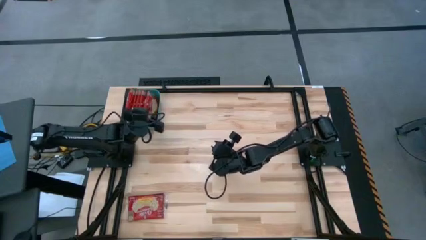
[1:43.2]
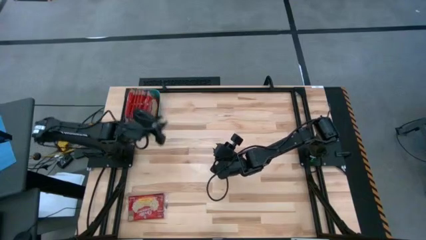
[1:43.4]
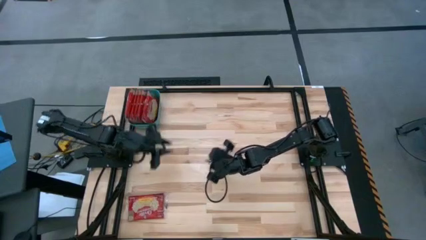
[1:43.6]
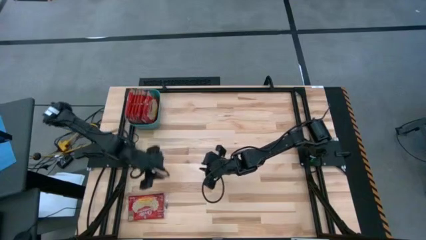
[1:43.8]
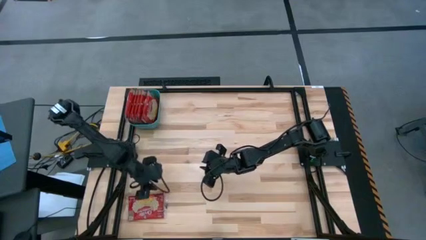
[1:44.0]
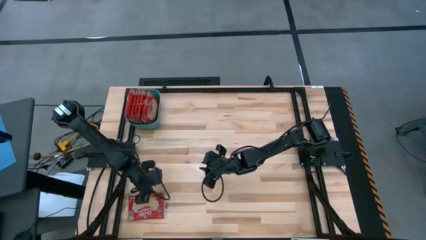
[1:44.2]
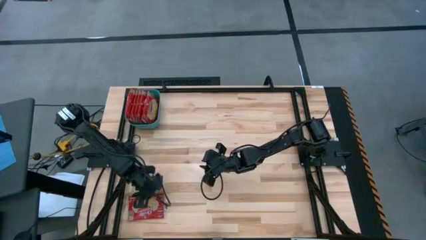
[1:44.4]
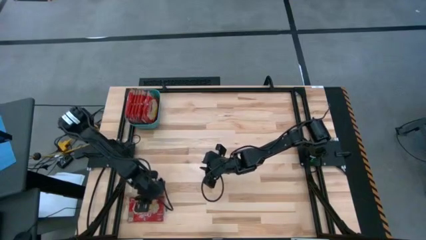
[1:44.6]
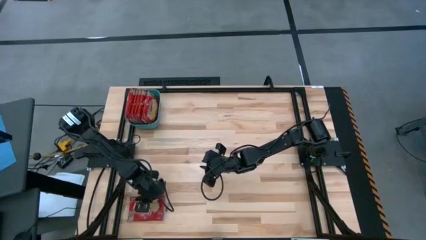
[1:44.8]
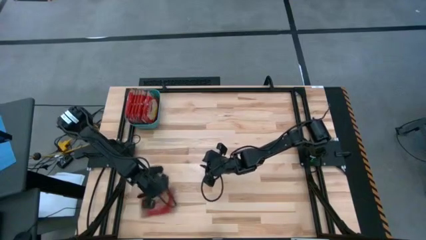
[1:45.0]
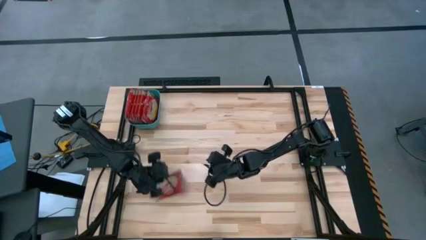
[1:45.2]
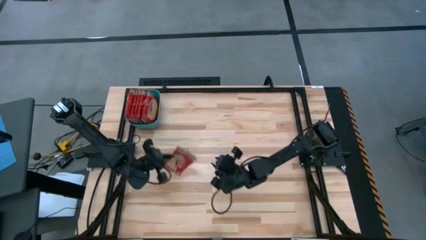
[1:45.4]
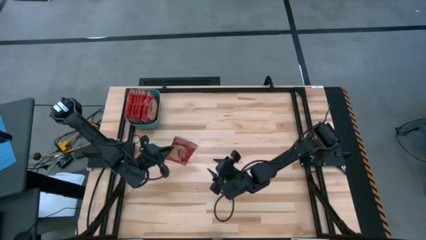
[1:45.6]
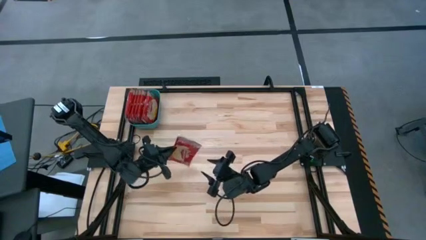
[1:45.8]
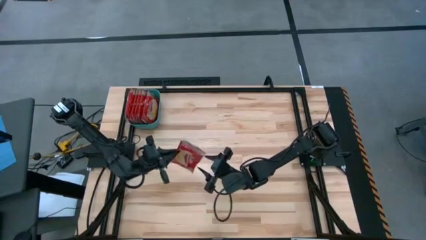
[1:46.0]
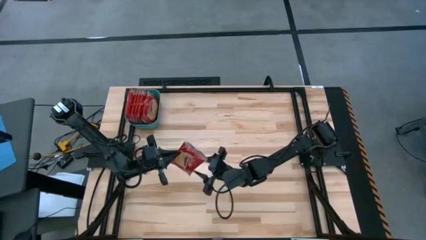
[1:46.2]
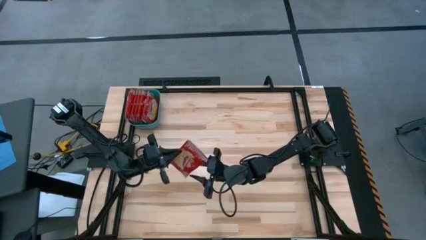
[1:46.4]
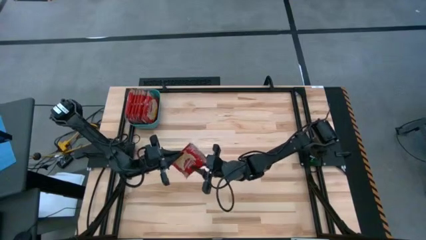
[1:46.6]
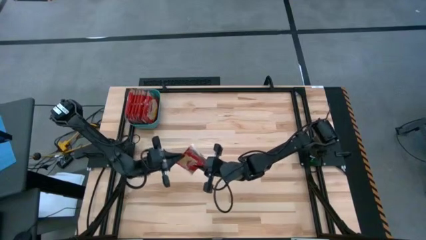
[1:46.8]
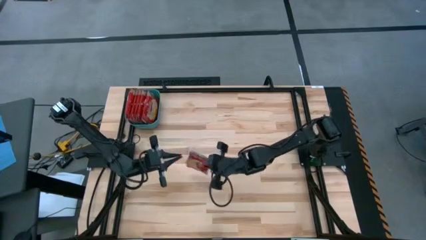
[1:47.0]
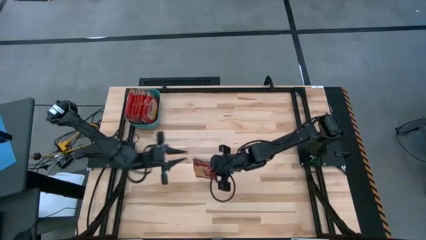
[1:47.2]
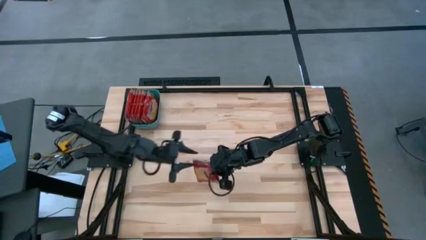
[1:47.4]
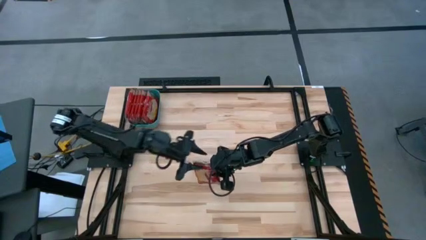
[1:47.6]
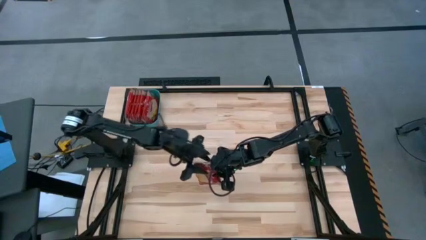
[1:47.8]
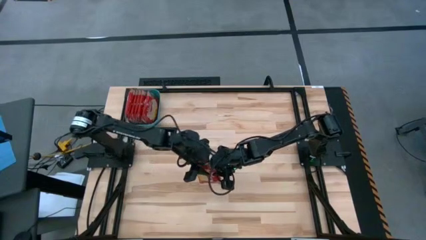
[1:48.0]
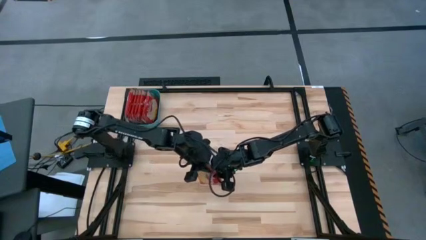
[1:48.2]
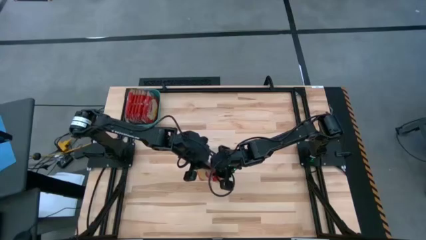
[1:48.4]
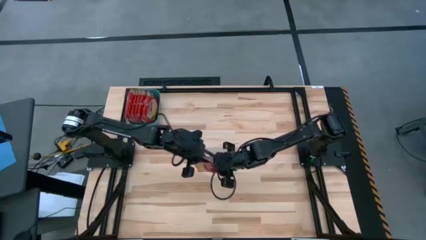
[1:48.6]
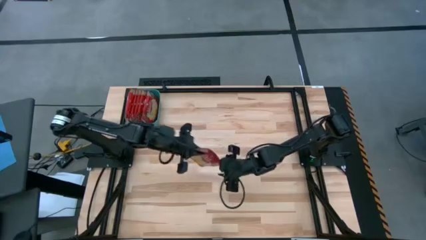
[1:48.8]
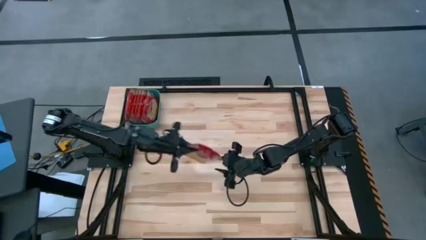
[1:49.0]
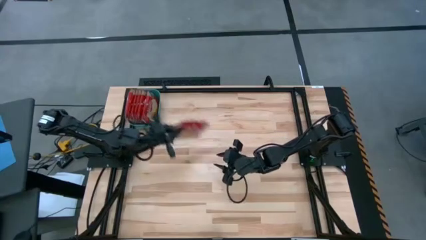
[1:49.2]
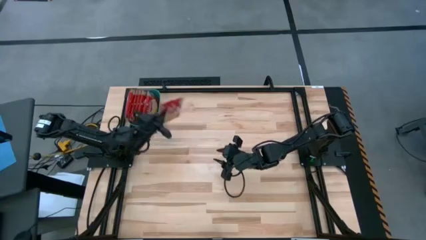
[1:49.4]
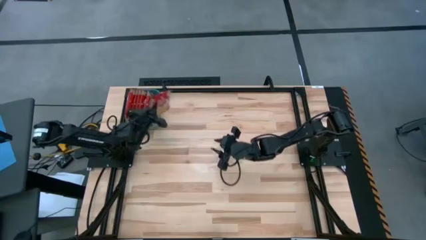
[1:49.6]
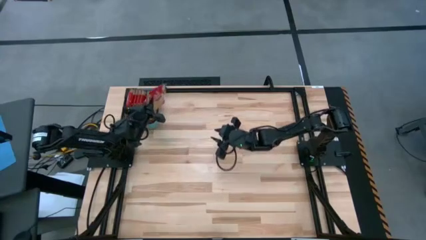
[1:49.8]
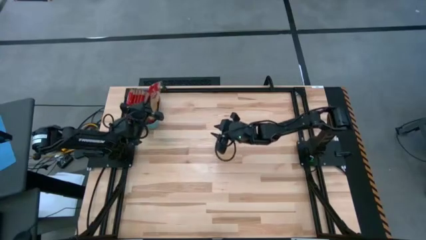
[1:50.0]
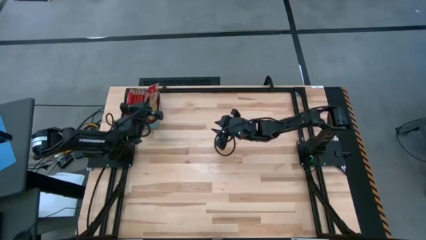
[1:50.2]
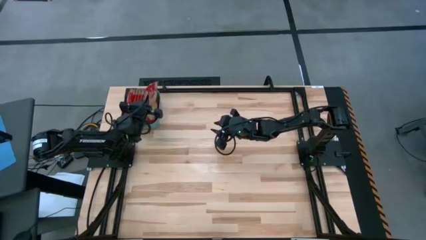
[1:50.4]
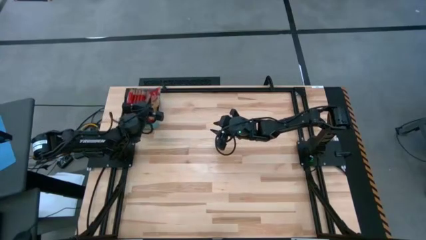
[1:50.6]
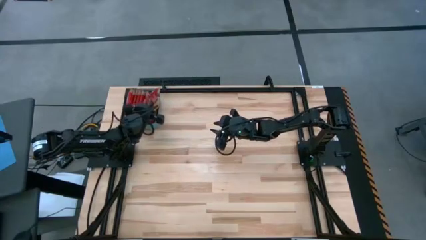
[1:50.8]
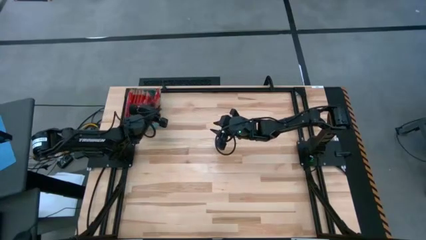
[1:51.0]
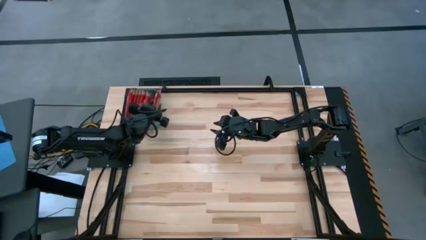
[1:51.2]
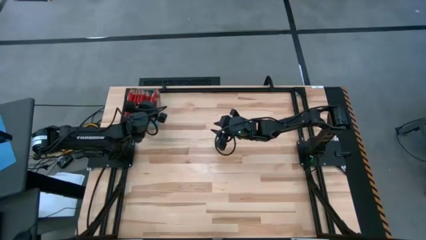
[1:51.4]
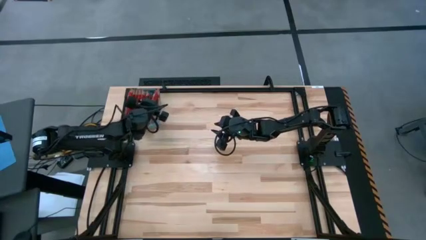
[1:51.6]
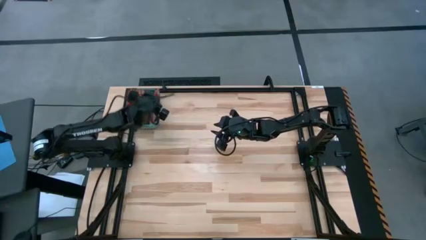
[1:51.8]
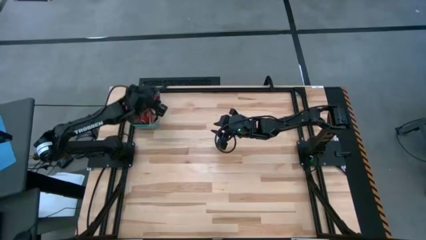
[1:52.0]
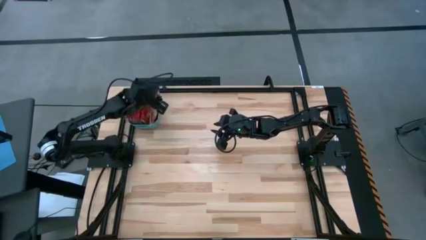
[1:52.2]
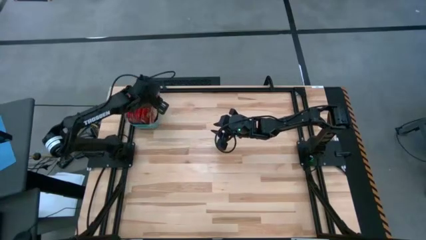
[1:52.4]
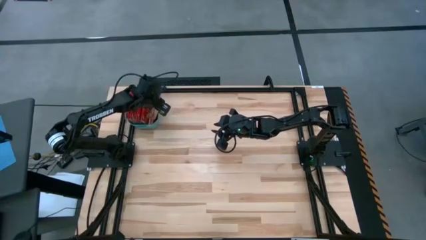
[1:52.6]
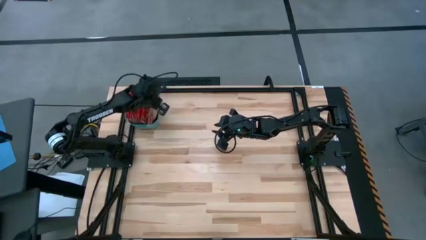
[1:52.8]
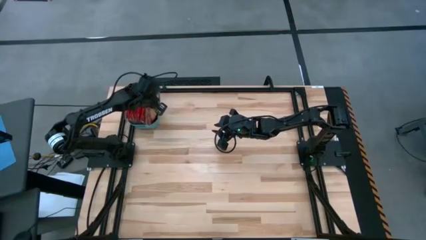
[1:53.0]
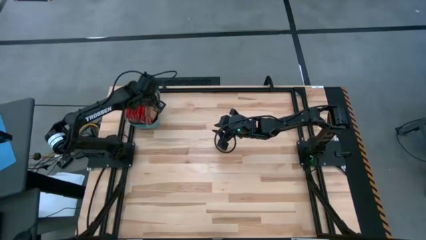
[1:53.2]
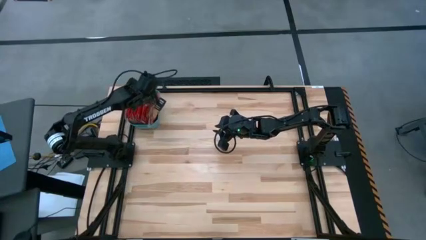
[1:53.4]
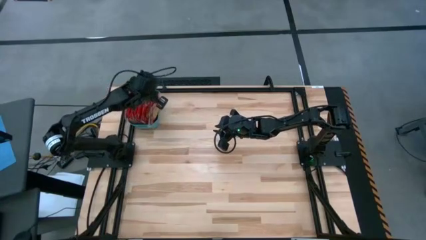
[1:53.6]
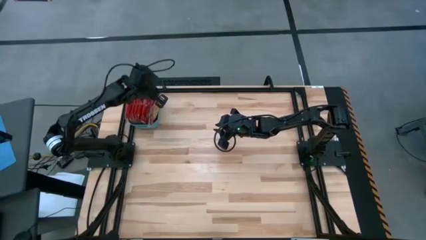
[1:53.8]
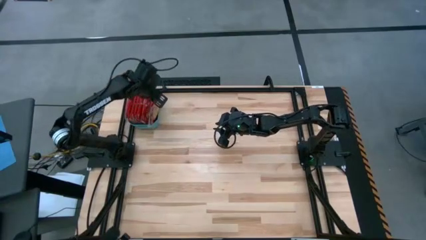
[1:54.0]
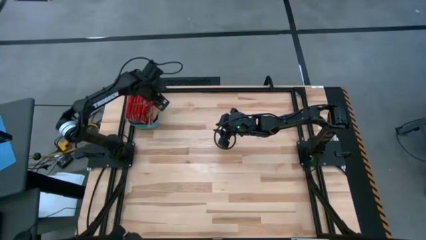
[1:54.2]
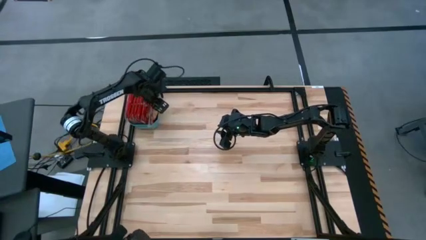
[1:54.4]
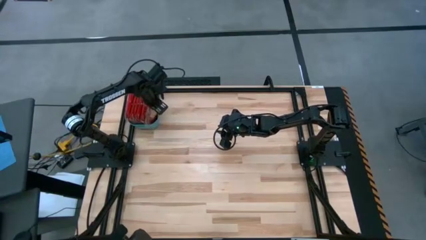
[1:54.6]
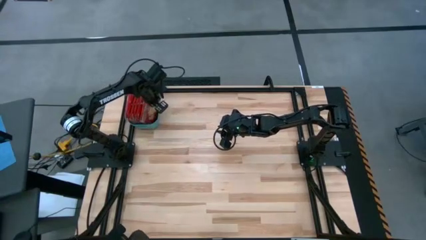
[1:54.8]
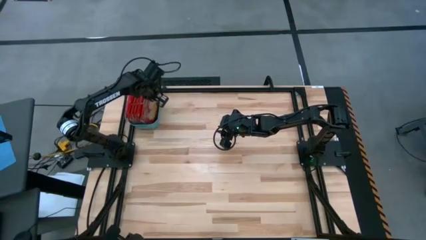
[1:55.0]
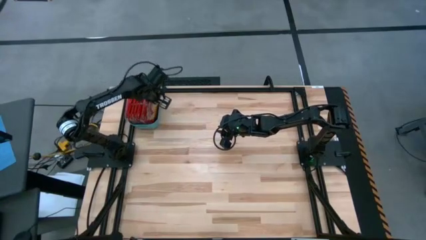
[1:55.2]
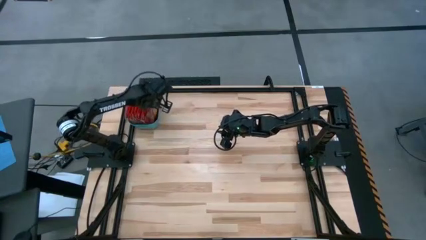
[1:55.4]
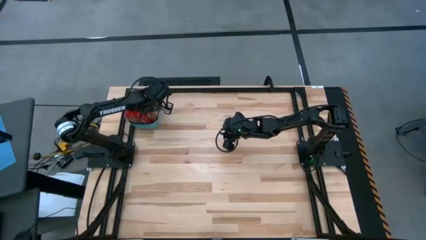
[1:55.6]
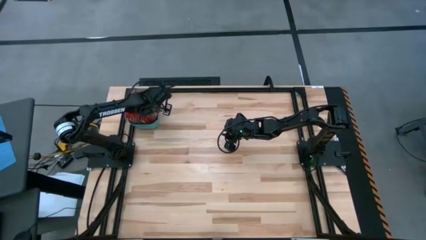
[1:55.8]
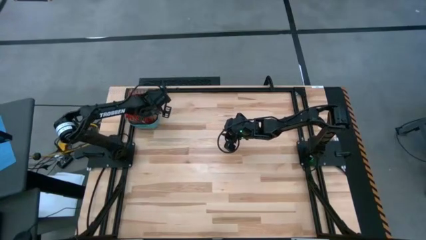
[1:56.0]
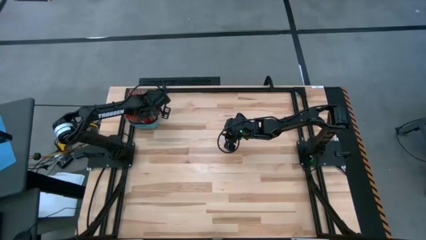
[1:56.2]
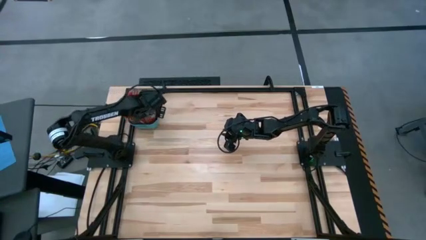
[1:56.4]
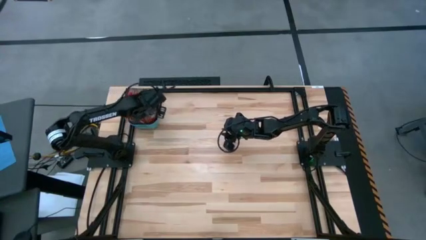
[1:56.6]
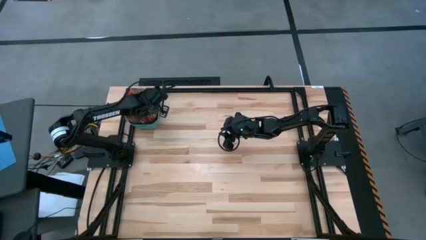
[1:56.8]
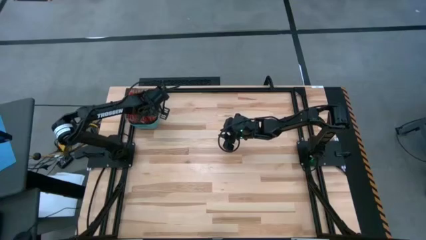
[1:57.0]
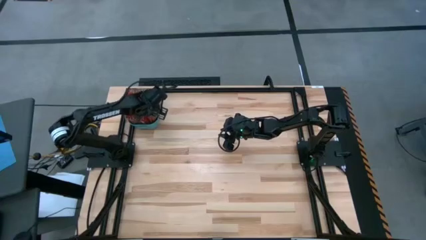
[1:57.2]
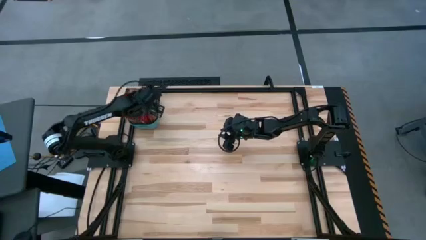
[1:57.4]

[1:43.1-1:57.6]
Task: Sort popcorn bags into baskets
Put the red popcorn bag in the blue bin
